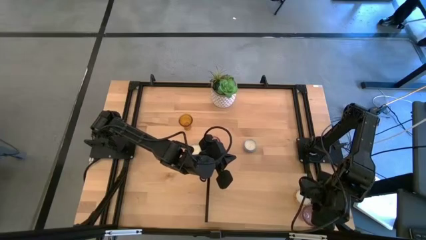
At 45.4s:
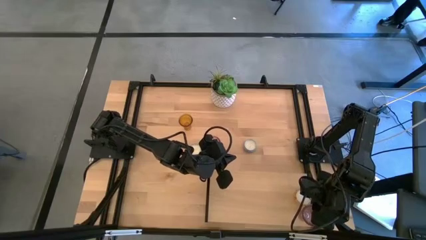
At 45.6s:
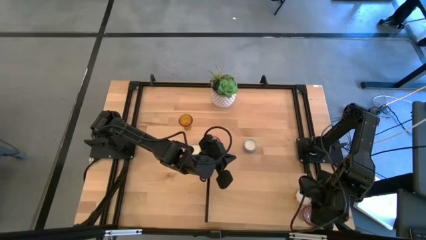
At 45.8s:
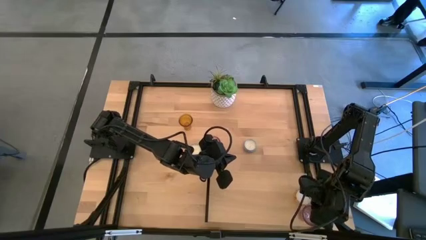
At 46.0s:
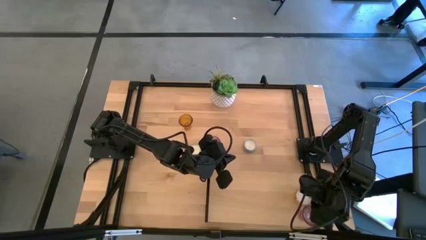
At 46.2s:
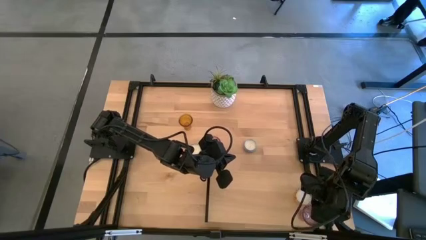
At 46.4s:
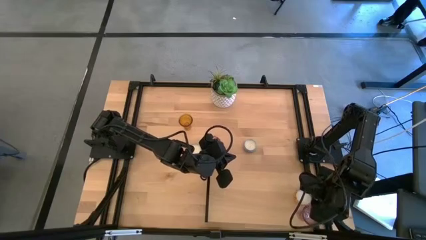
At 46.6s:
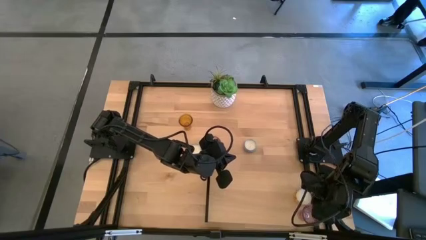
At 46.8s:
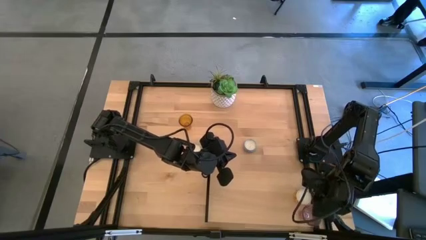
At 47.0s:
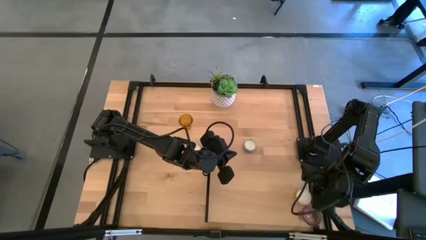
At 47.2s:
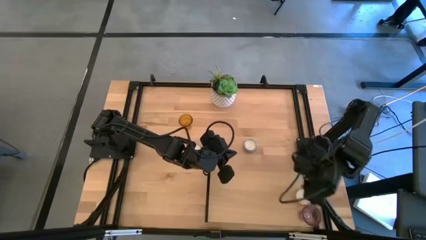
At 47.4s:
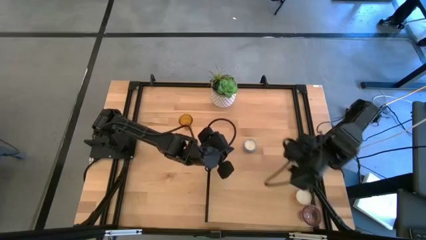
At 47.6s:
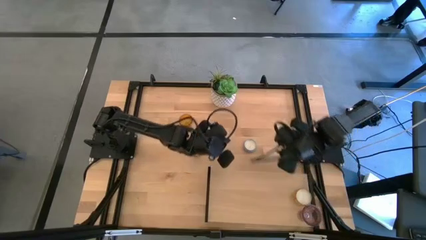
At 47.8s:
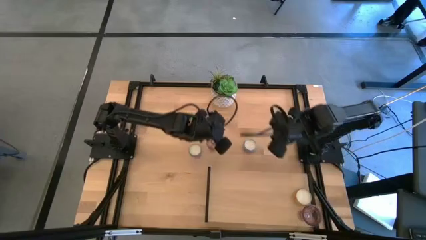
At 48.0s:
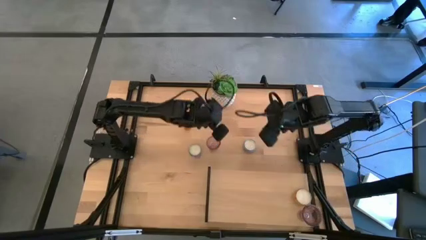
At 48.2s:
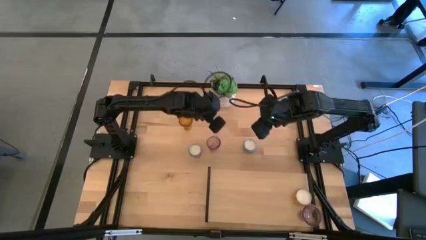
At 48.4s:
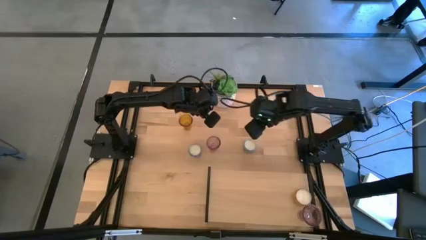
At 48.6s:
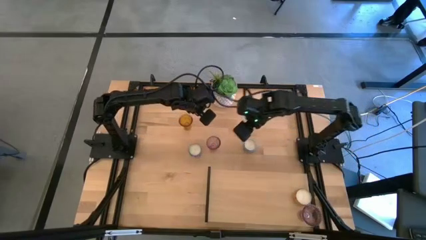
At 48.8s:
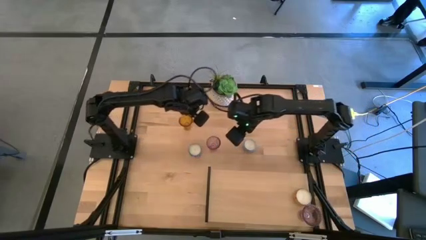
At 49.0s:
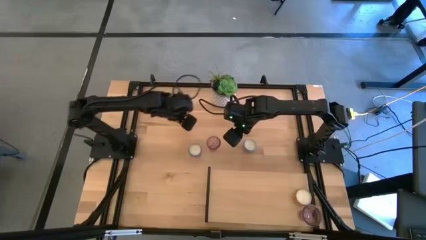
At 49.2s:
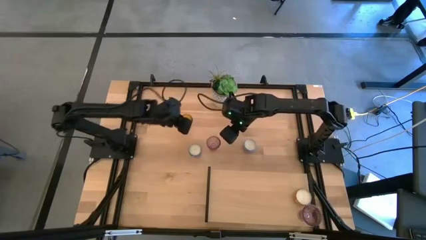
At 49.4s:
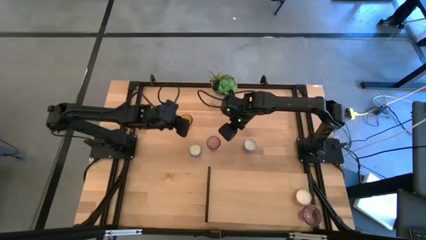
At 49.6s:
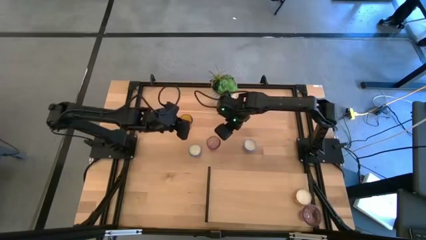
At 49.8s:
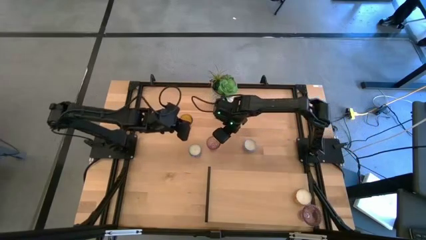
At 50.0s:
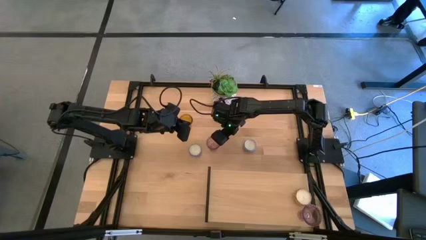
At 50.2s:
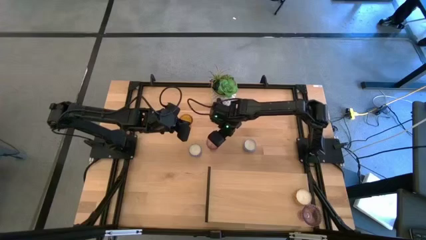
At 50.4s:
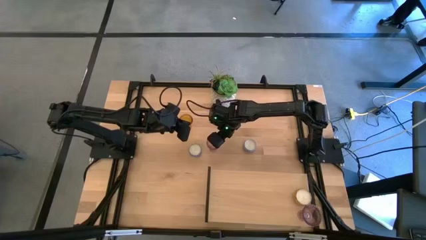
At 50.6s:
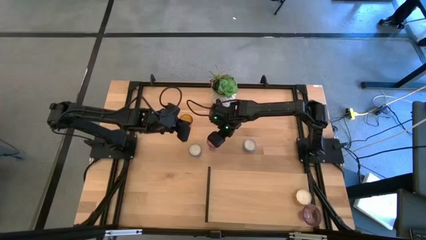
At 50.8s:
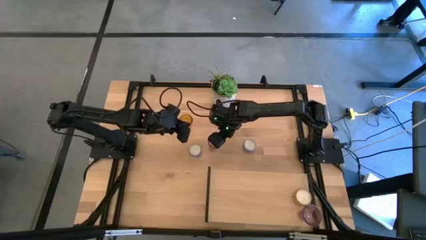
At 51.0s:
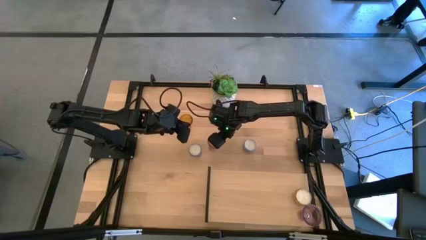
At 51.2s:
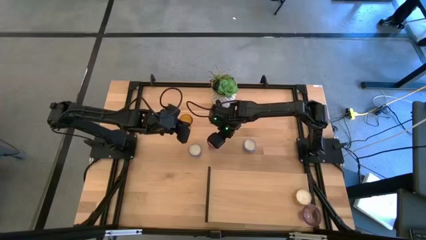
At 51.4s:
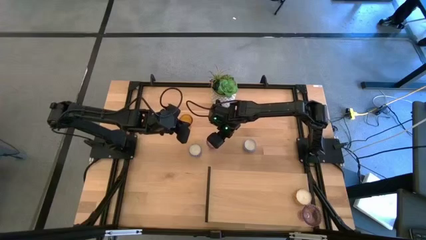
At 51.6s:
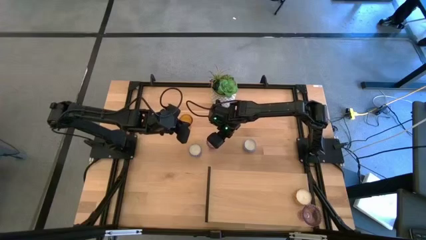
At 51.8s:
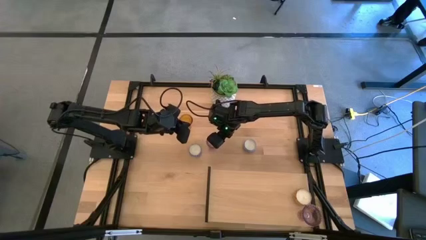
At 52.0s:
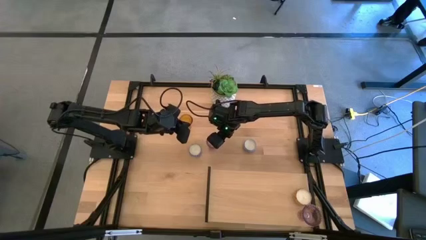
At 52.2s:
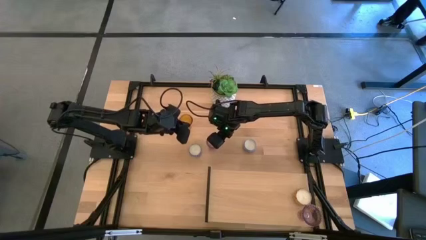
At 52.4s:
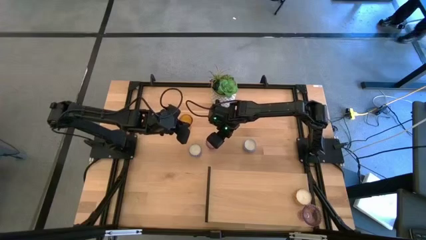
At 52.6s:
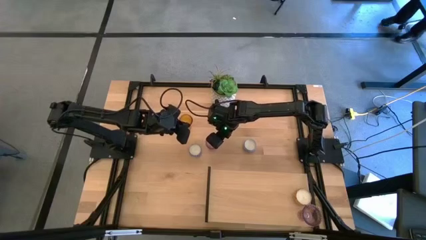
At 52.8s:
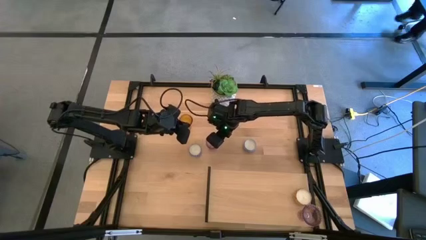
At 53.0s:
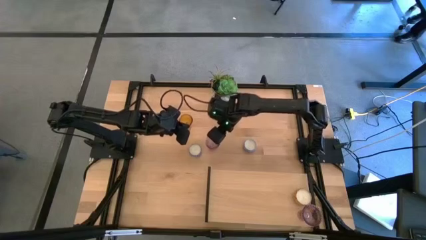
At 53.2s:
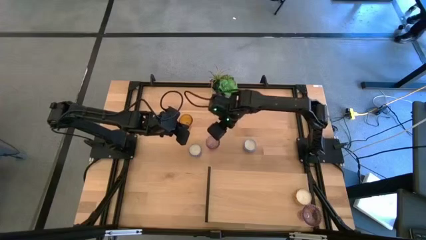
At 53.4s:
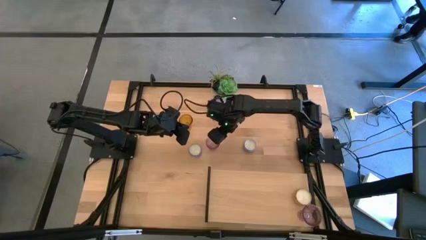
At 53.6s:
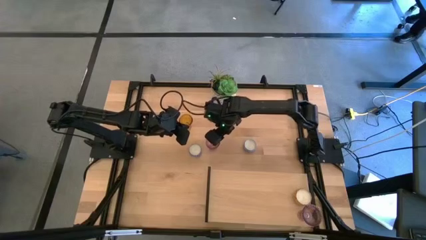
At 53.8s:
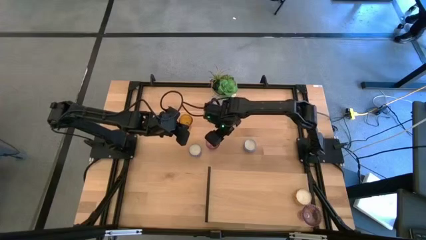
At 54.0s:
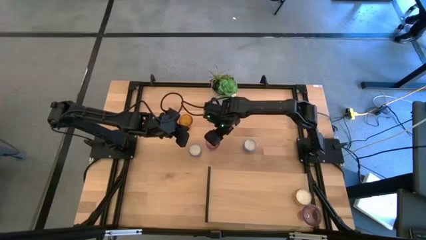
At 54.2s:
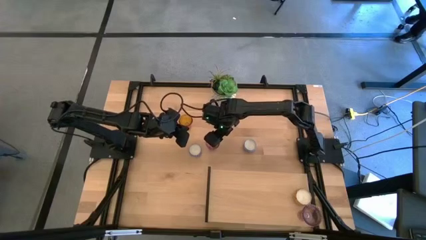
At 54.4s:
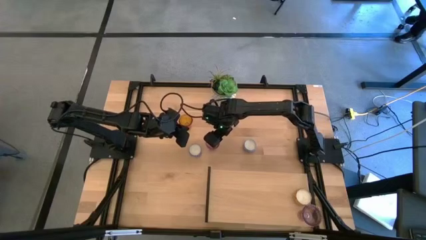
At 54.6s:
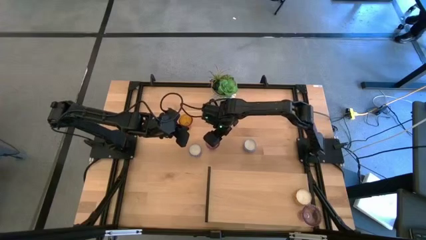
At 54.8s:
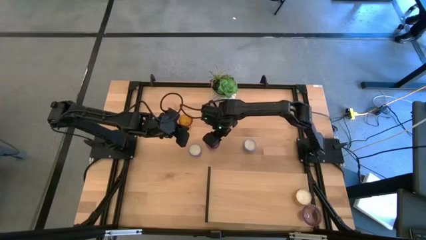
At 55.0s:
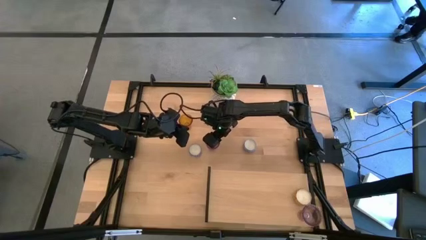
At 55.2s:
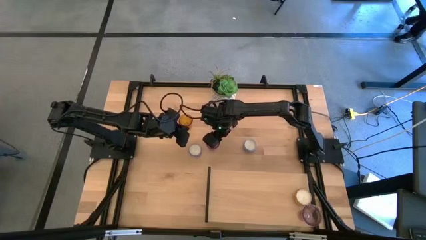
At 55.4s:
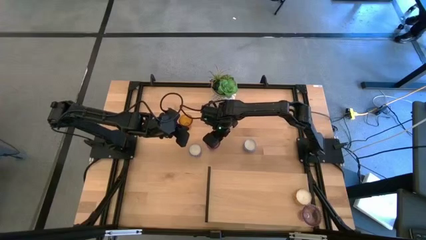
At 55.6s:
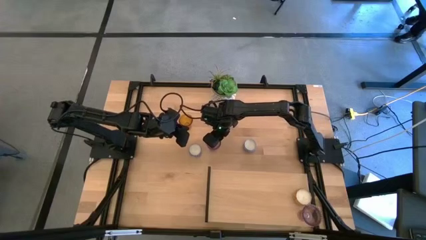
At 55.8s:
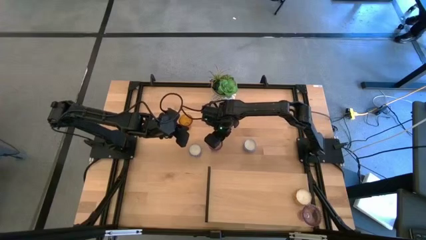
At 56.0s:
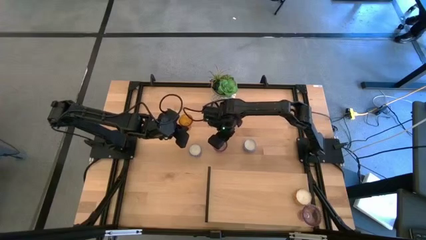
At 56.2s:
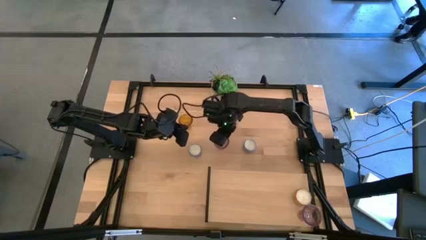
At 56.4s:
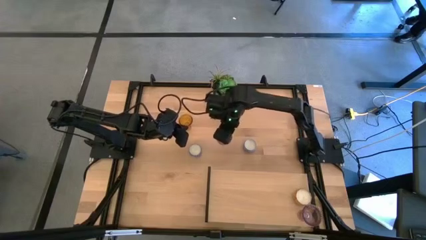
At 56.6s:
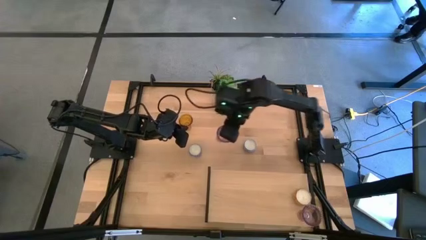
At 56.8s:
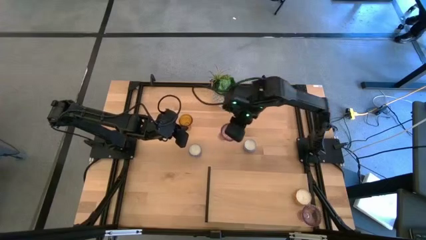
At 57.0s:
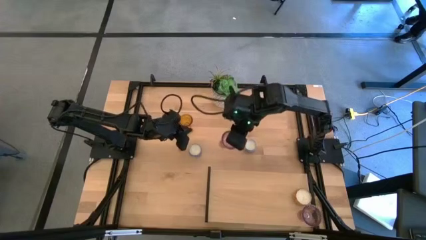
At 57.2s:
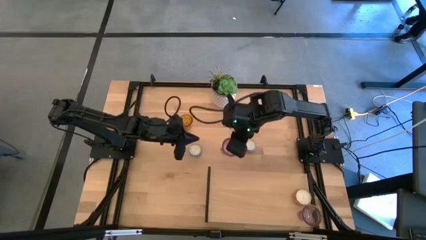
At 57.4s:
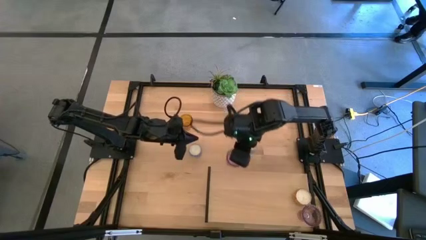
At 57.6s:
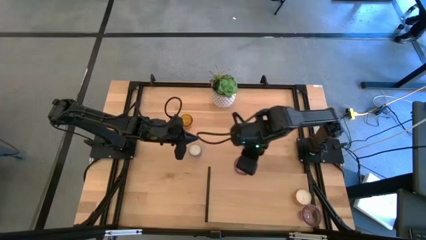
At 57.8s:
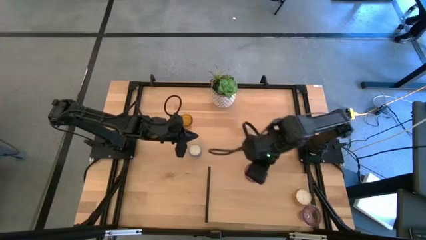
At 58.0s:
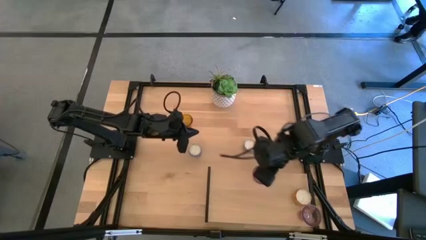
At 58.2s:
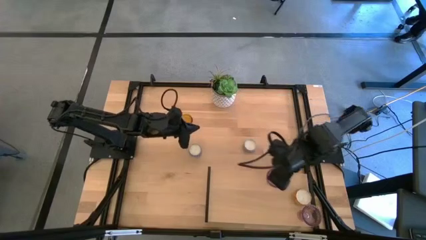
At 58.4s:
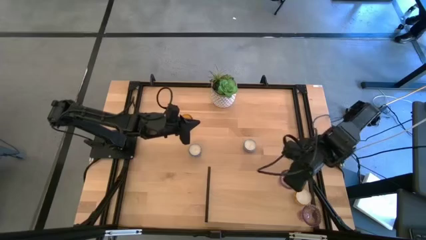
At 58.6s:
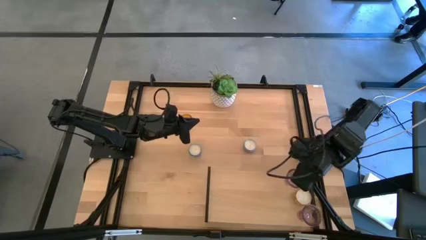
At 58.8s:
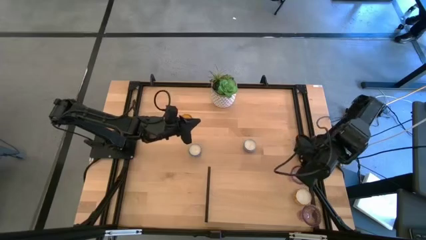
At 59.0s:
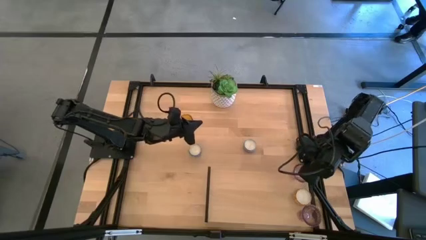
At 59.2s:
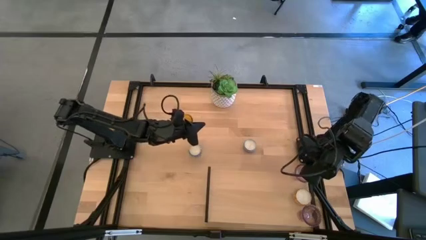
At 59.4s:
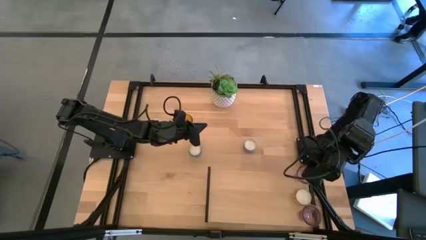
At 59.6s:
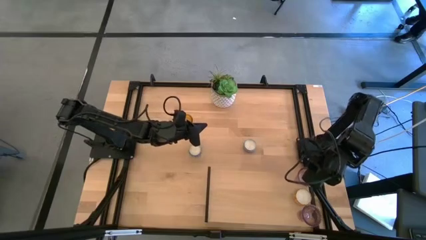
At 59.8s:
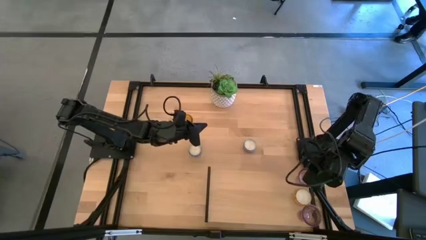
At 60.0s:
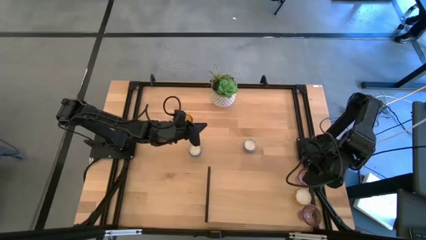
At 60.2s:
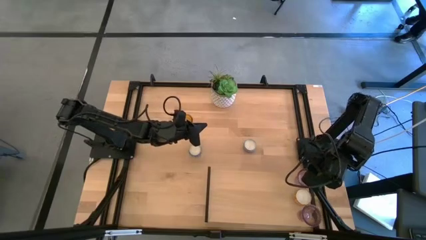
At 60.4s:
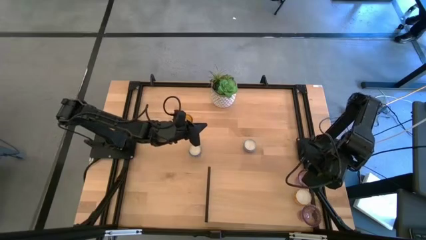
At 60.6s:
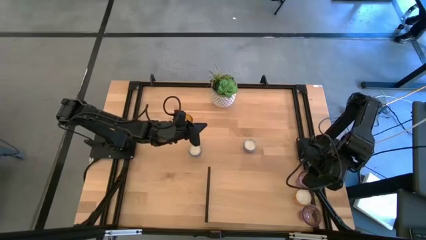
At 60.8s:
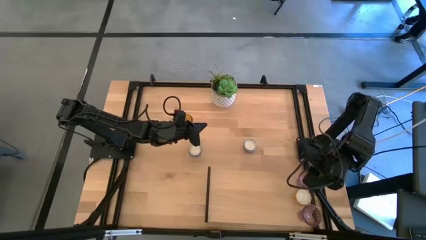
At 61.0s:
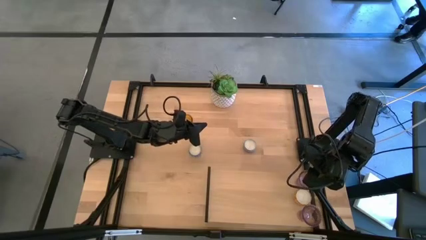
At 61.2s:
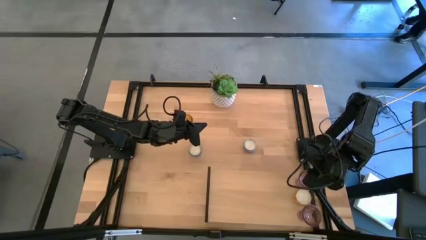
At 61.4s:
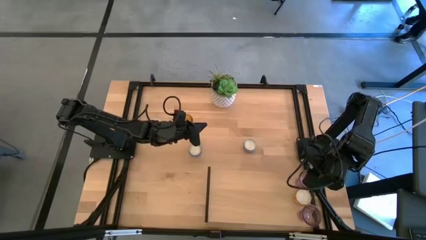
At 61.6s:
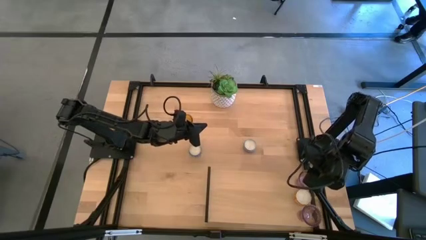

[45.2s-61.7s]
Task: Pick & Place candle stick holders
Put the purple glass candle holder on the shelf aligned with the yellow scented candle
